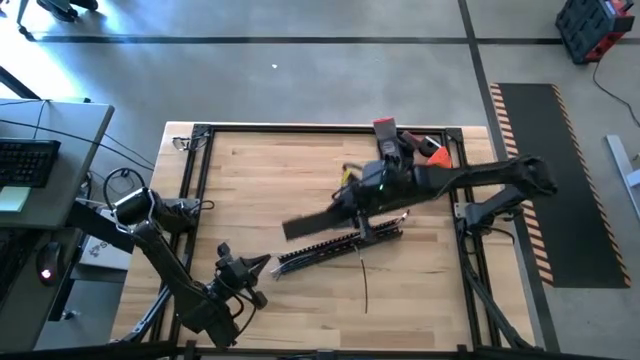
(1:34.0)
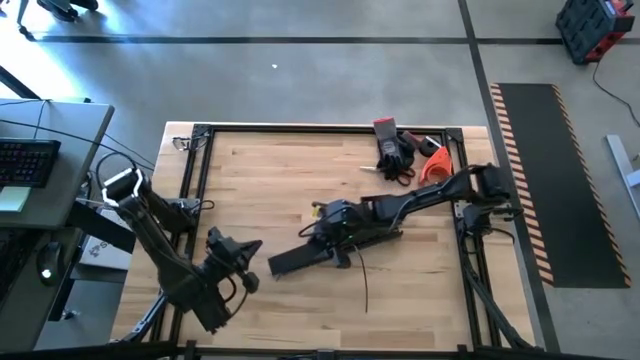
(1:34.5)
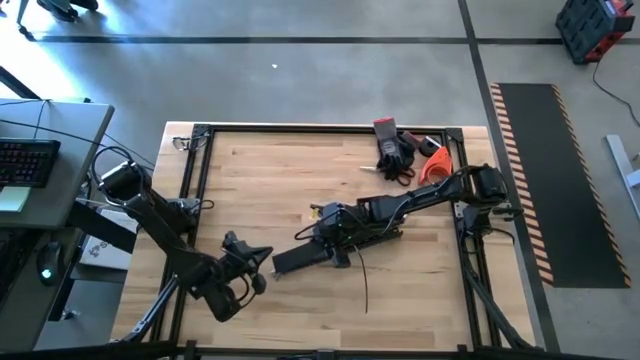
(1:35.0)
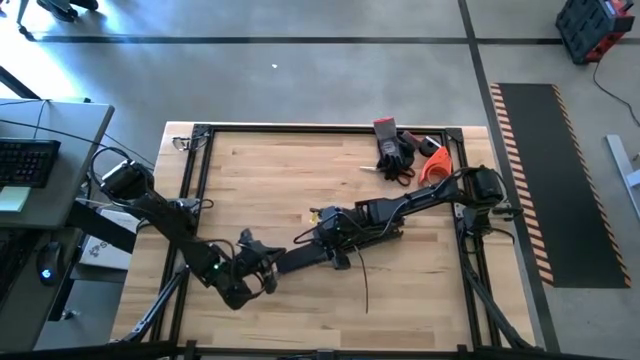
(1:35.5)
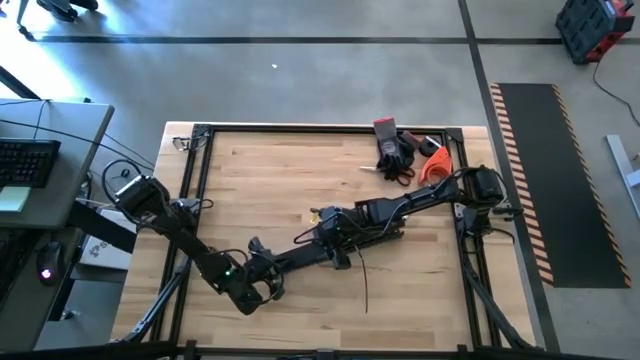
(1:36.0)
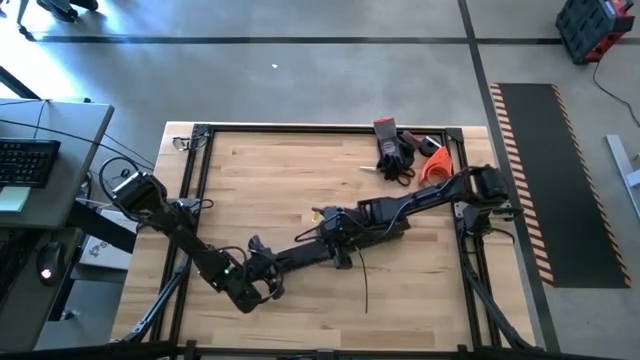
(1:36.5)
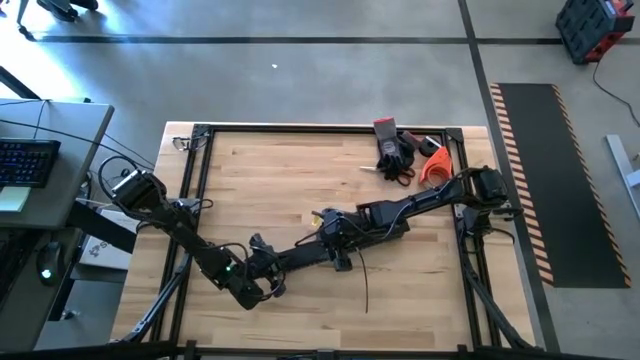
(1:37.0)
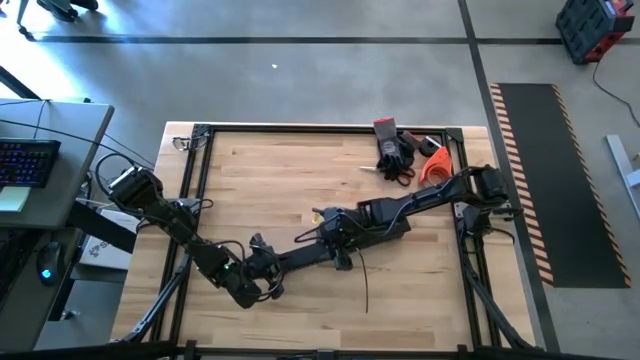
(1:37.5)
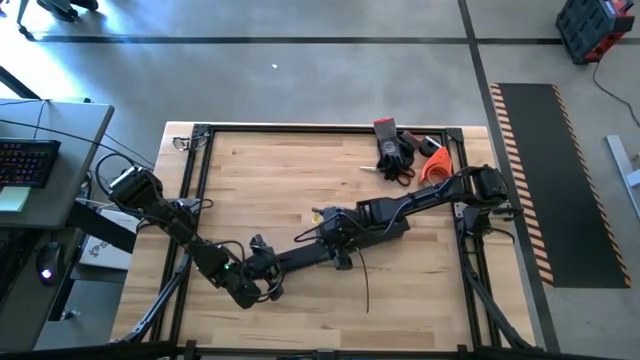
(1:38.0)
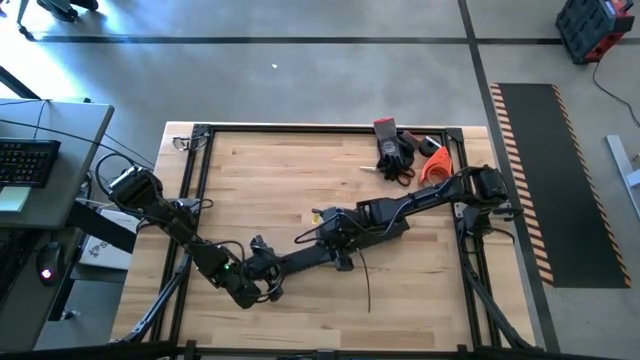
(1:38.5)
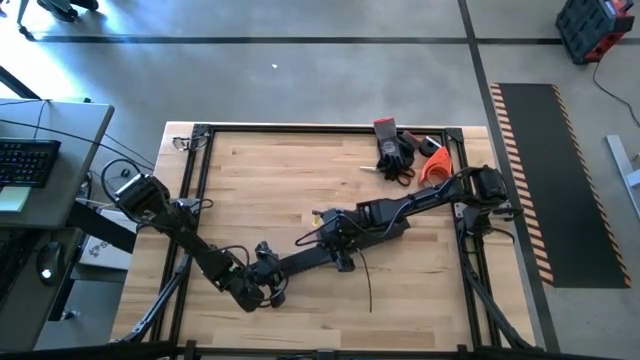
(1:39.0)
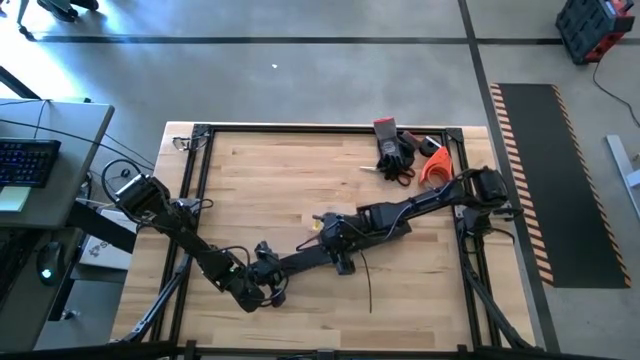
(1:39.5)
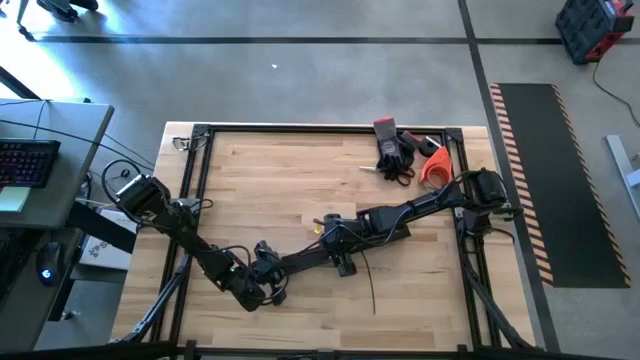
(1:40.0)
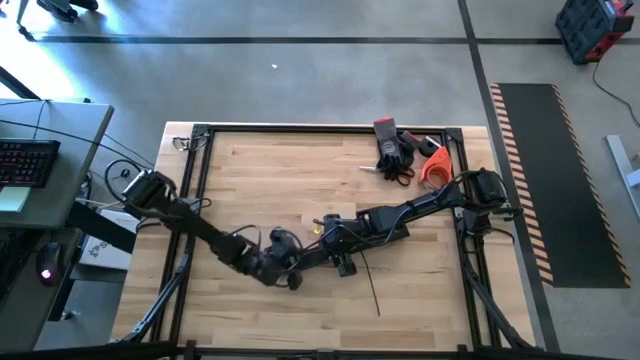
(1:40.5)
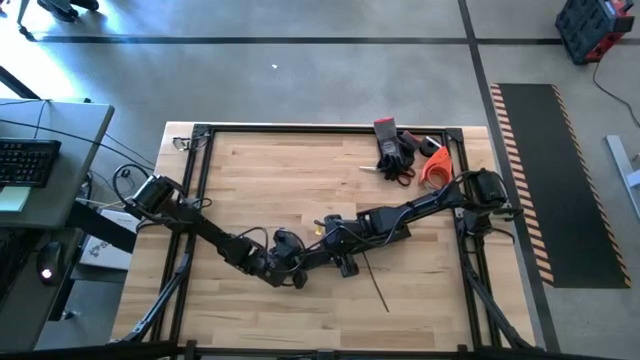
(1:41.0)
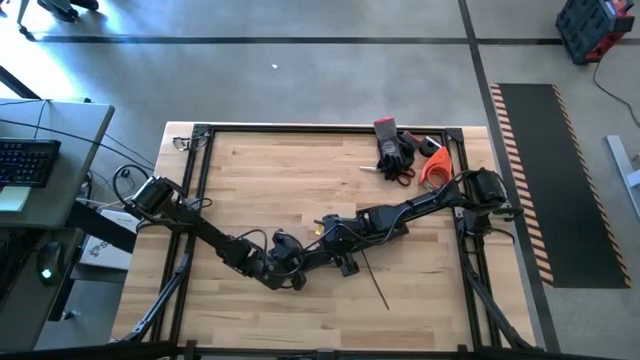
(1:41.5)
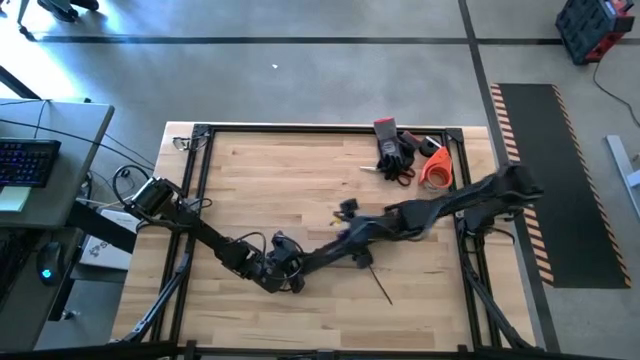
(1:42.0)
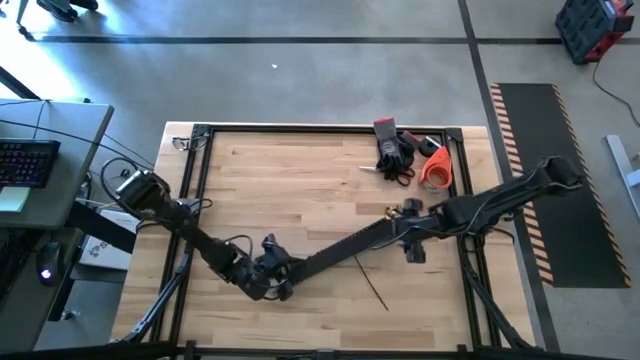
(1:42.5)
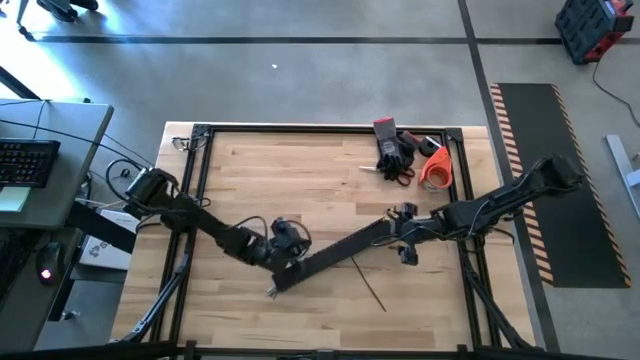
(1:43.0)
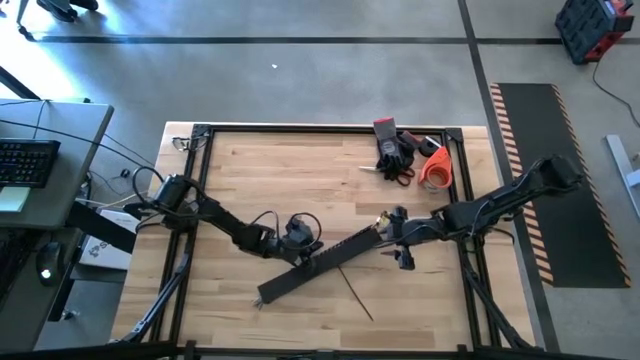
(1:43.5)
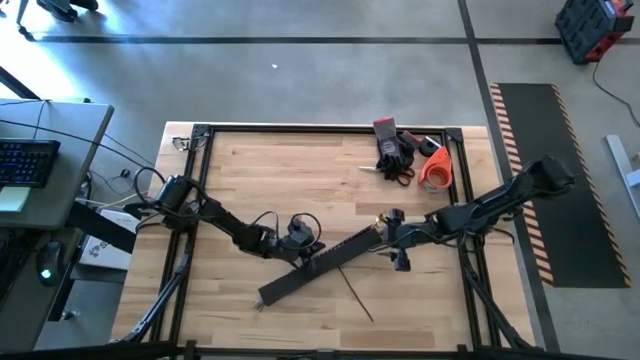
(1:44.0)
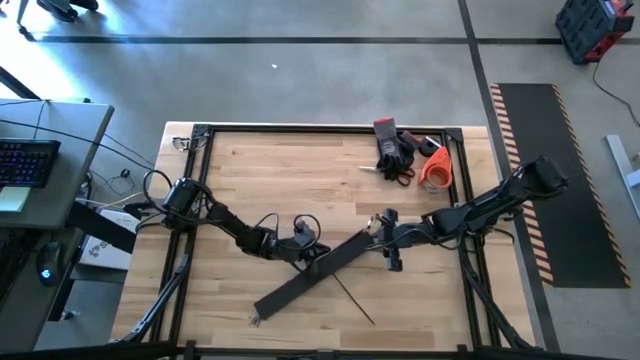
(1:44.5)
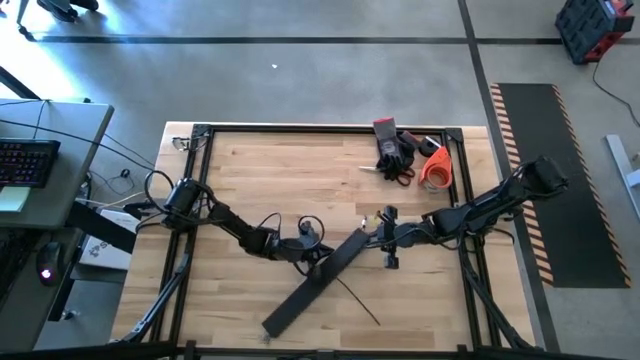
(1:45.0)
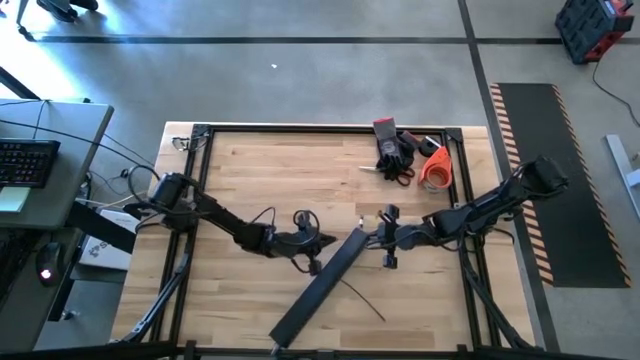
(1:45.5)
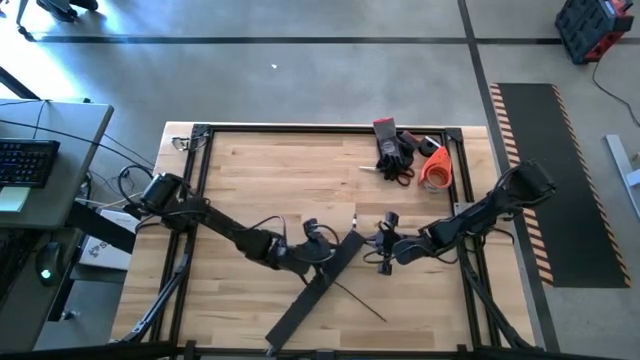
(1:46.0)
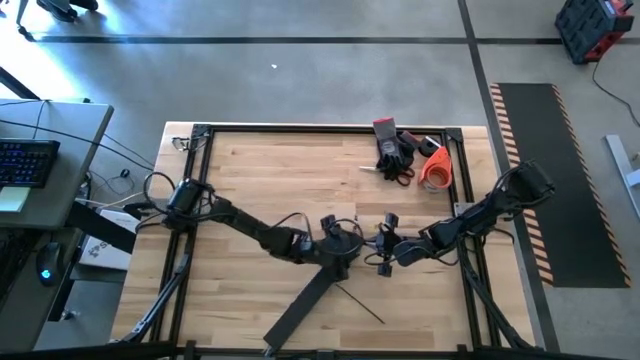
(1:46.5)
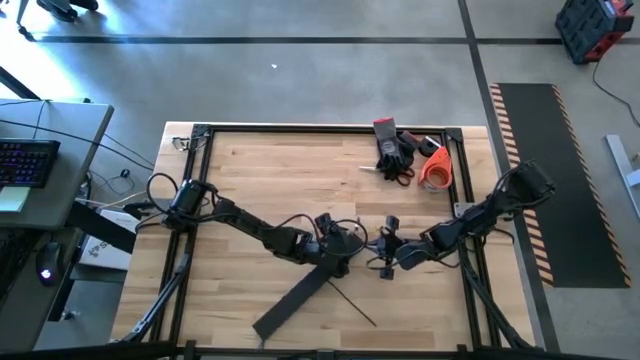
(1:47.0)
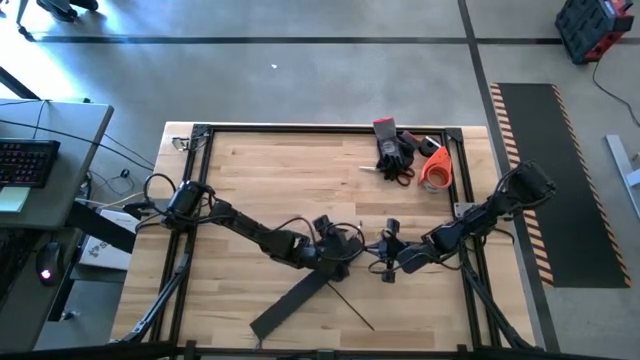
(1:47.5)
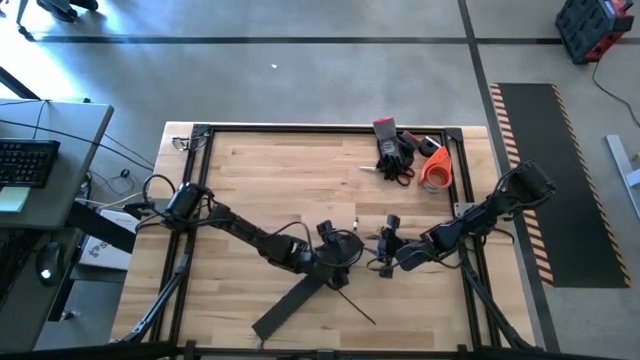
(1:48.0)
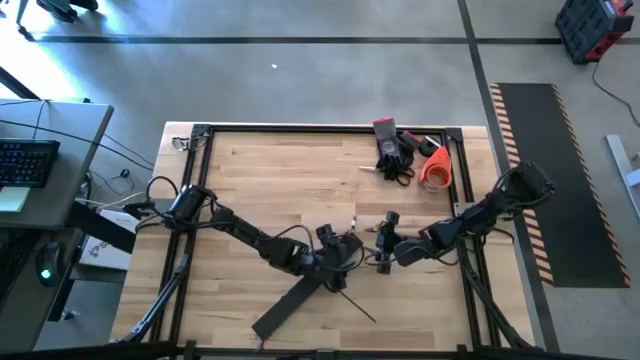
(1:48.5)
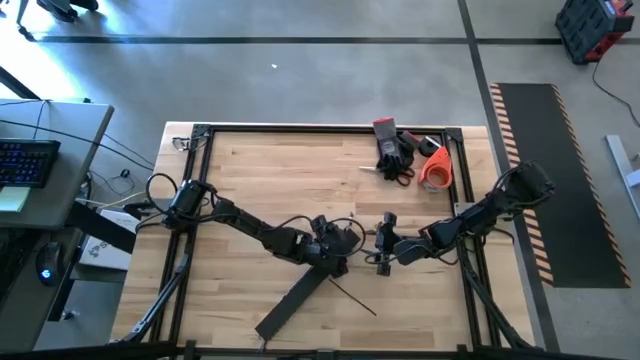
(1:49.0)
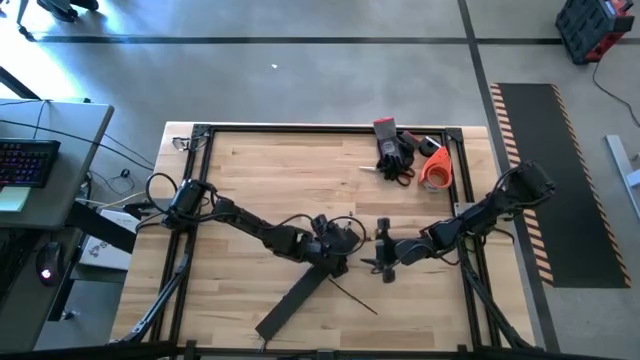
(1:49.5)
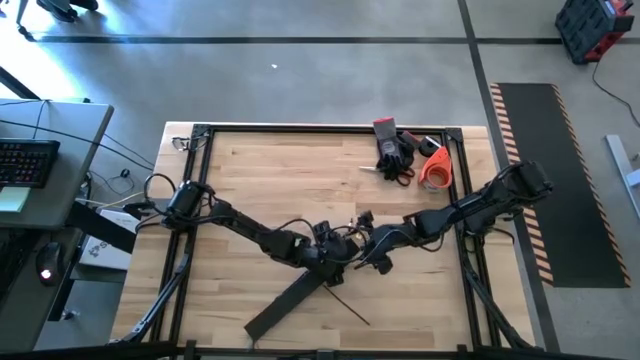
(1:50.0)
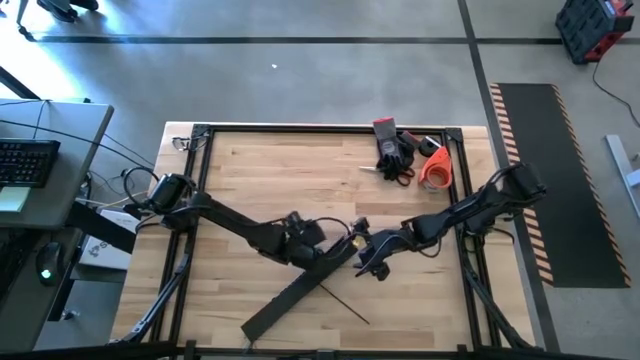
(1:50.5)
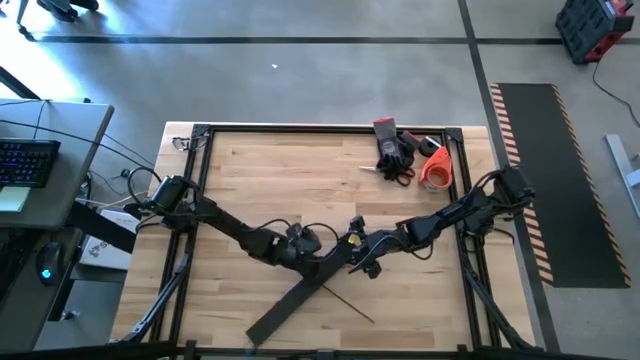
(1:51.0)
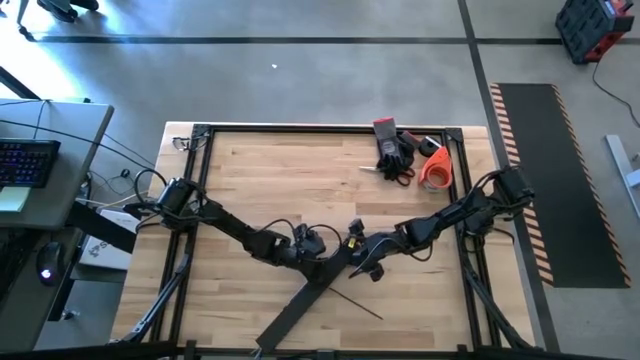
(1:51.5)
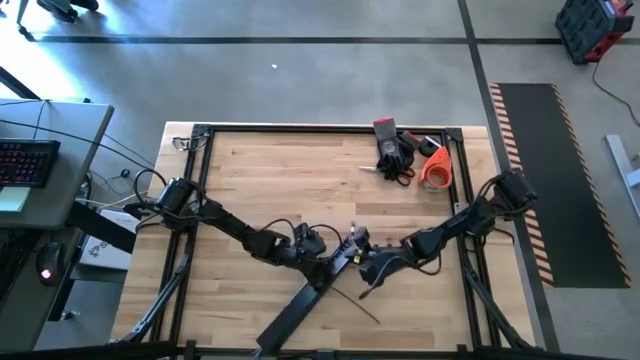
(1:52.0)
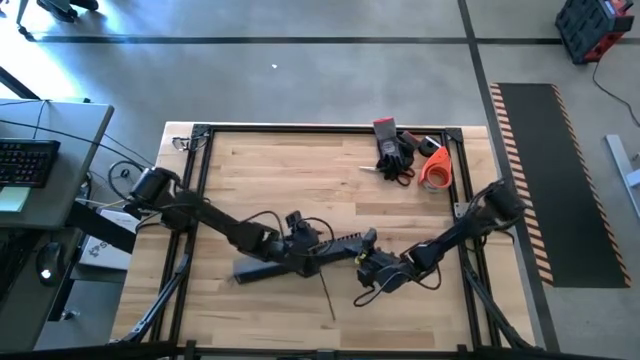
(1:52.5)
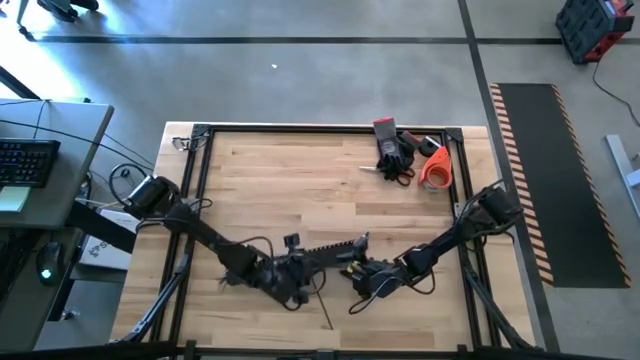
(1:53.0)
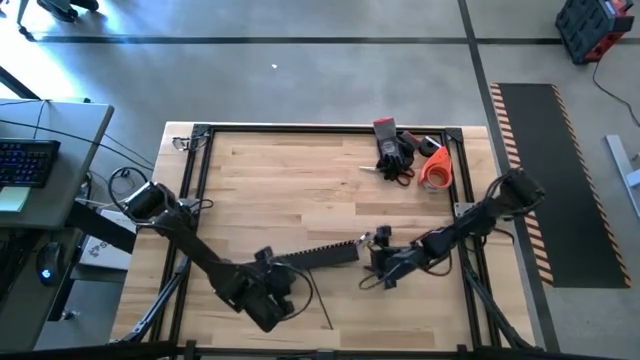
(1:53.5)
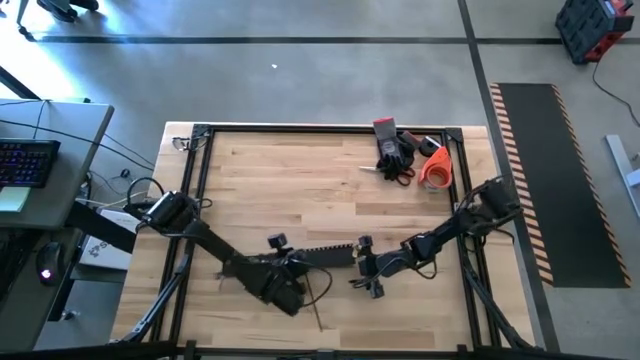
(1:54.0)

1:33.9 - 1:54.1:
Task: Ziptie cables
Close the black cable duct with the black cable duct cover
